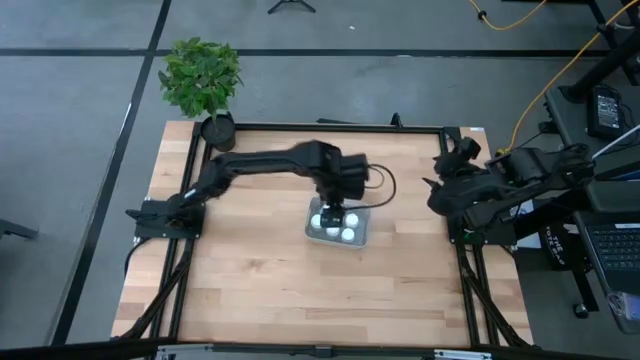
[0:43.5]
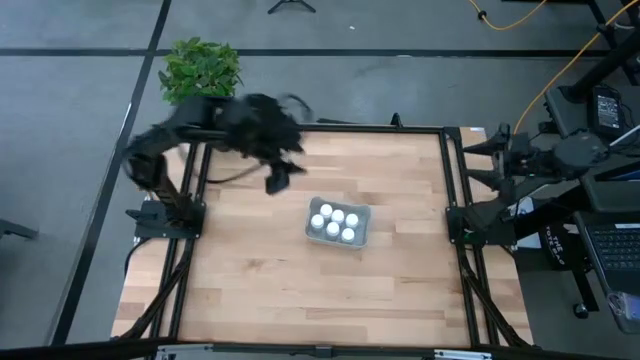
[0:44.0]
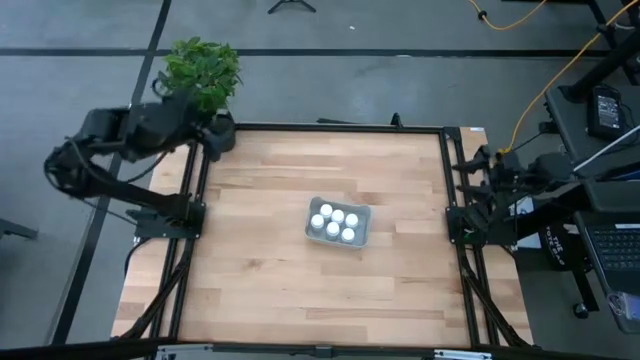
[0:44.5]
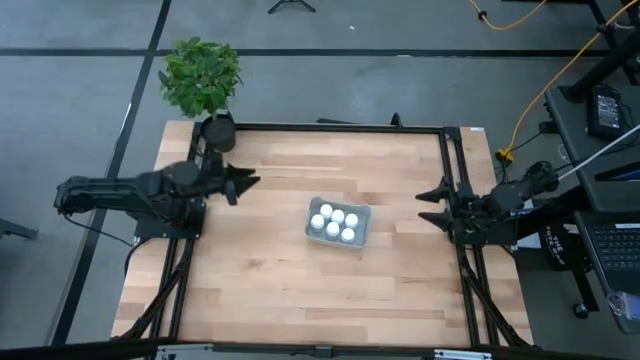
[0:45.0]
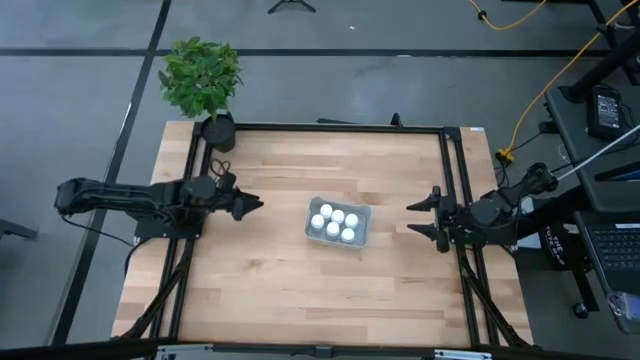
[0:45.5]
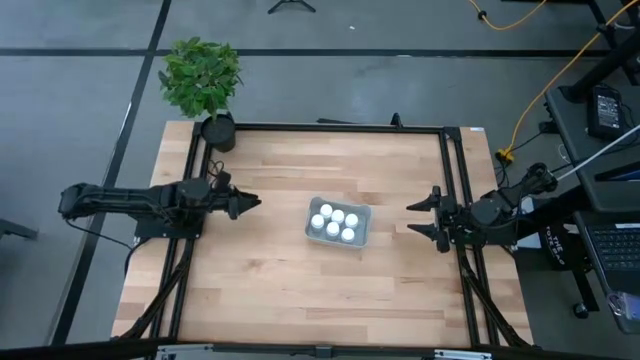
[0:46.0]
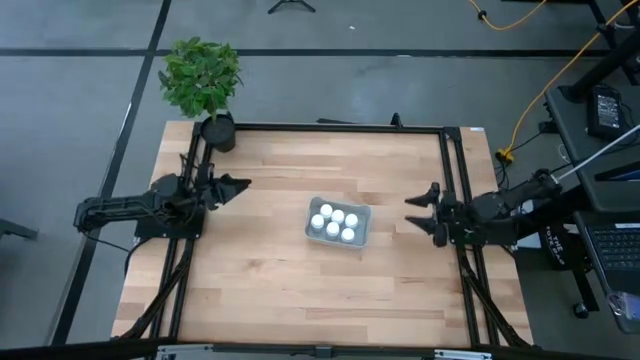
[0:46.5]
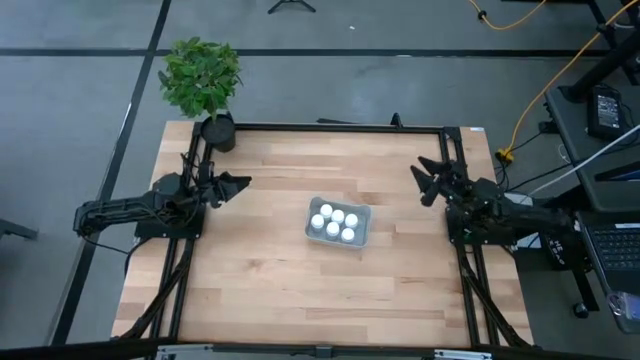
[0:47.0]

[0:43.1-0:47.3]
Task: Pick and place pill bottles into a basket
Return to Home Position

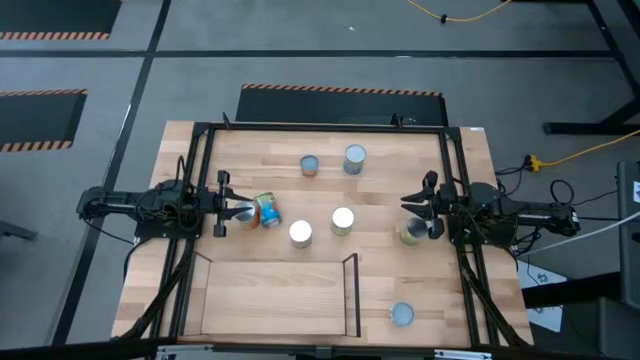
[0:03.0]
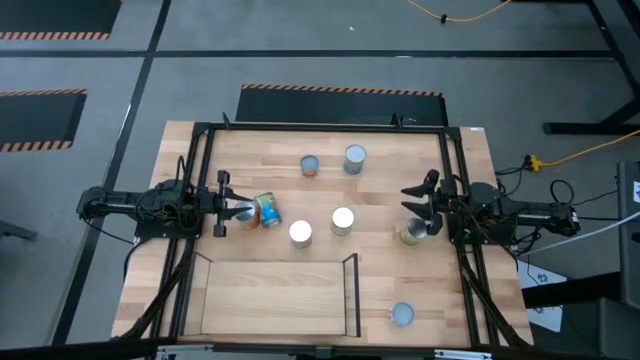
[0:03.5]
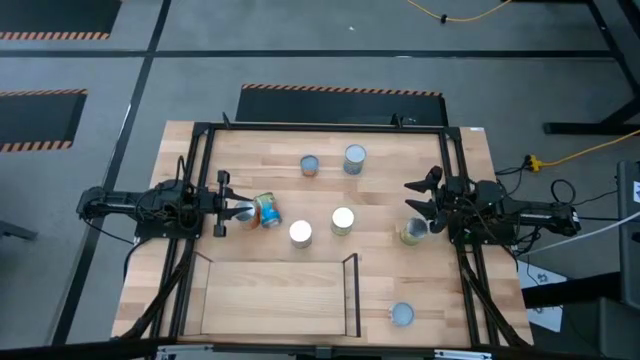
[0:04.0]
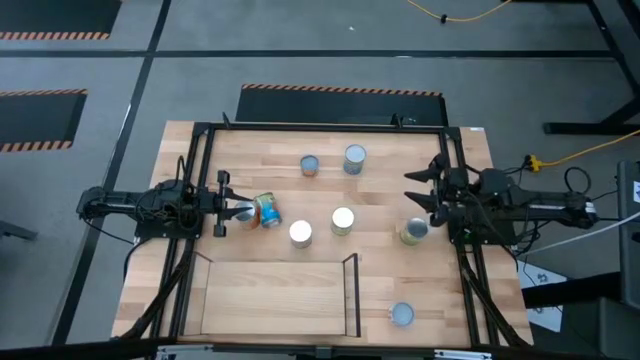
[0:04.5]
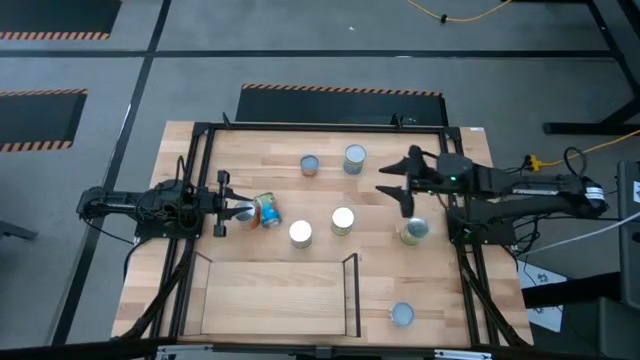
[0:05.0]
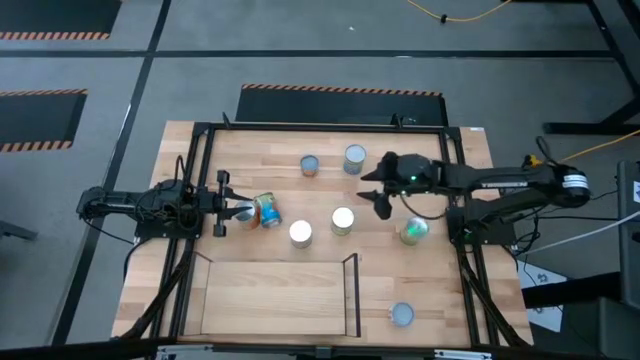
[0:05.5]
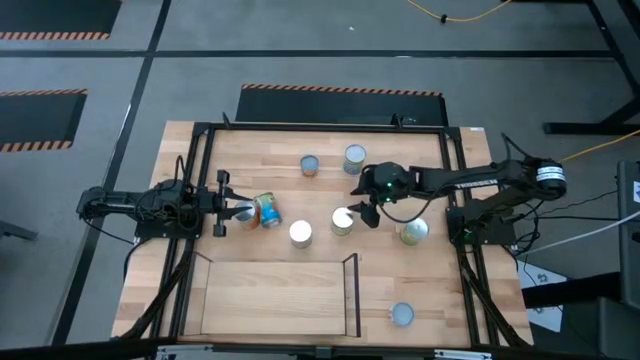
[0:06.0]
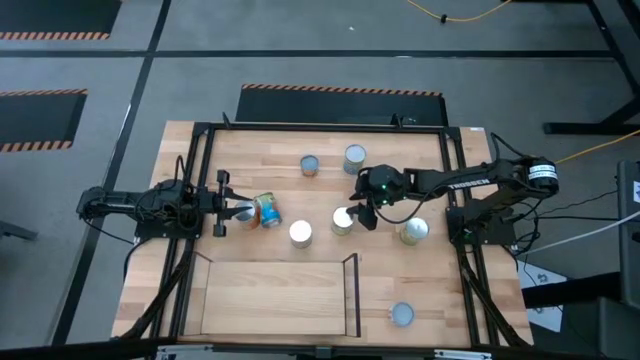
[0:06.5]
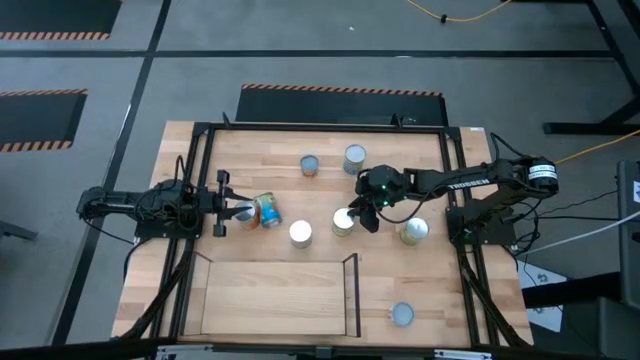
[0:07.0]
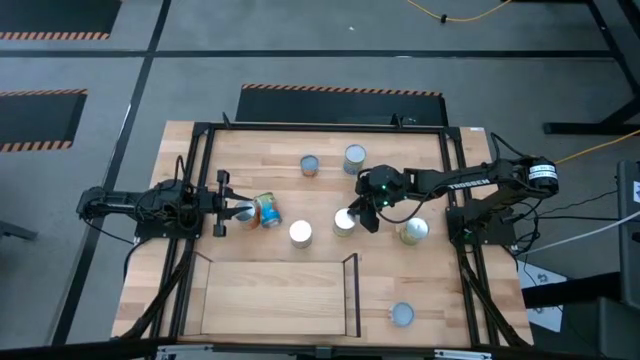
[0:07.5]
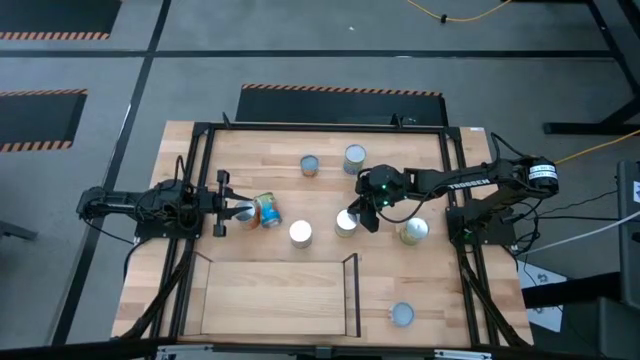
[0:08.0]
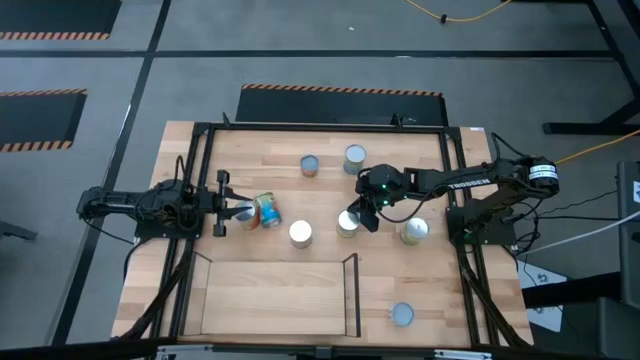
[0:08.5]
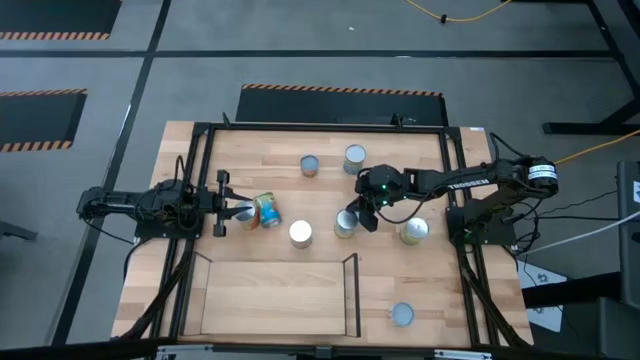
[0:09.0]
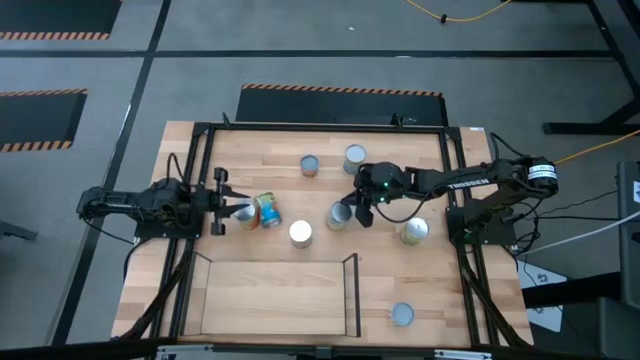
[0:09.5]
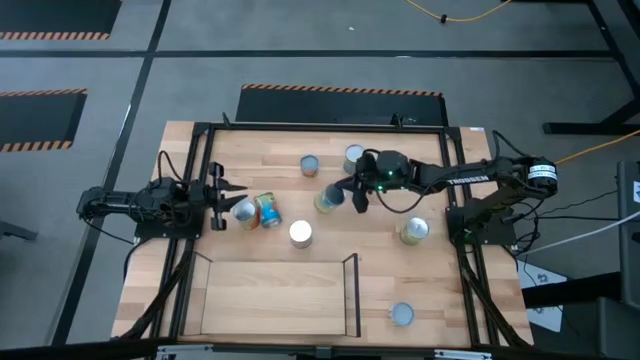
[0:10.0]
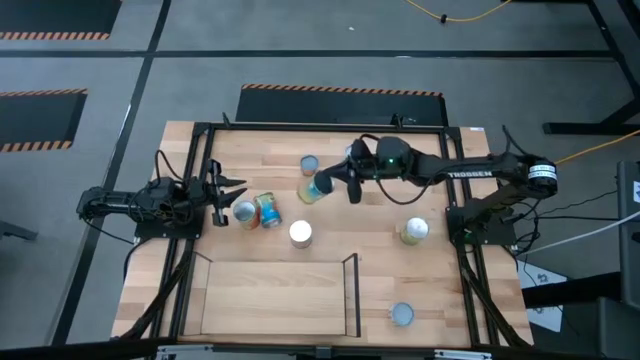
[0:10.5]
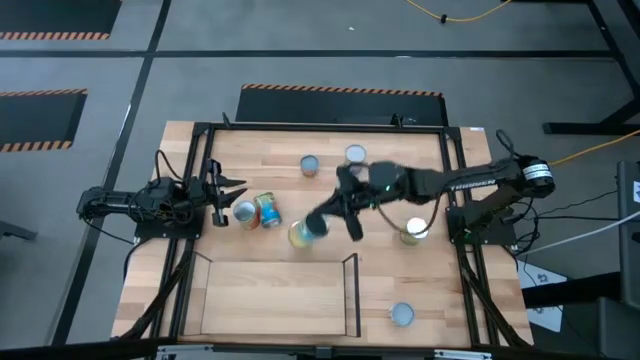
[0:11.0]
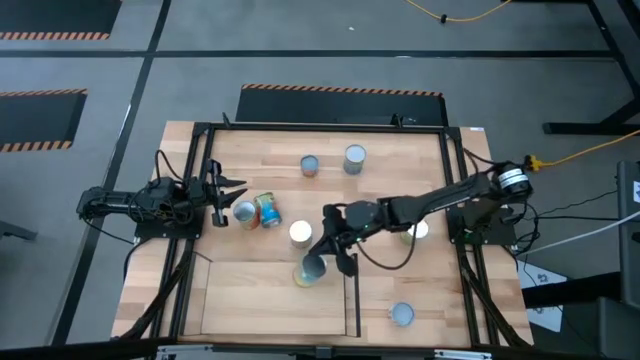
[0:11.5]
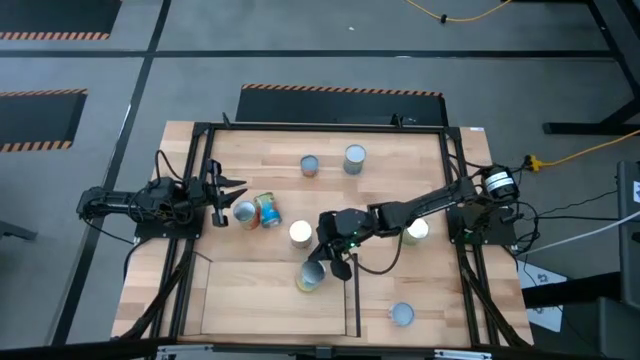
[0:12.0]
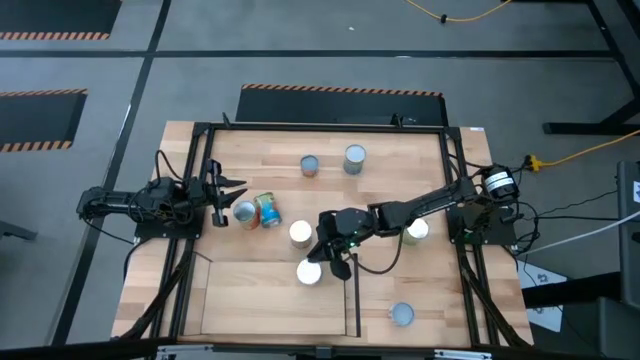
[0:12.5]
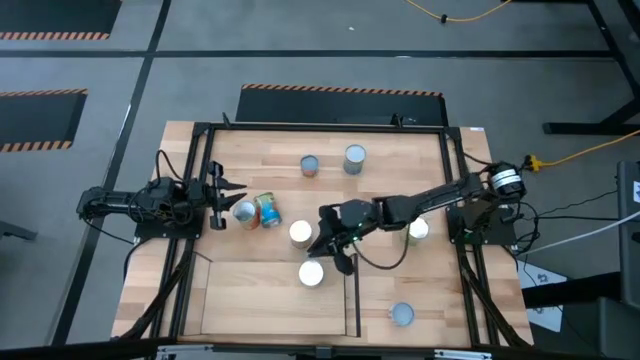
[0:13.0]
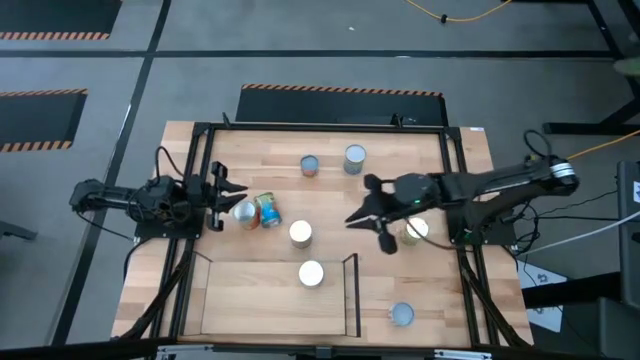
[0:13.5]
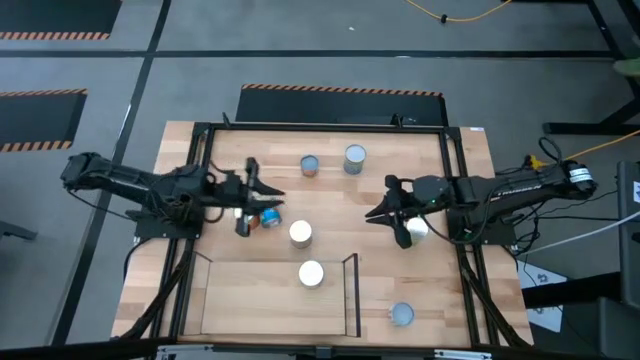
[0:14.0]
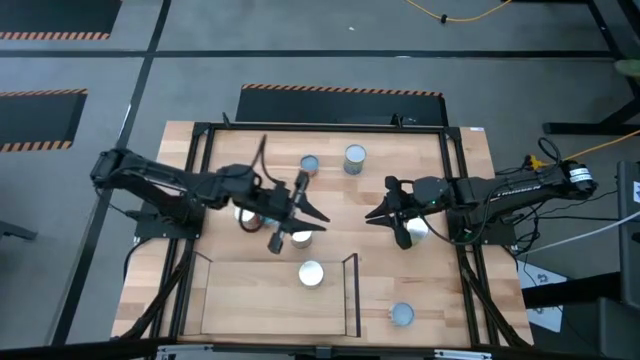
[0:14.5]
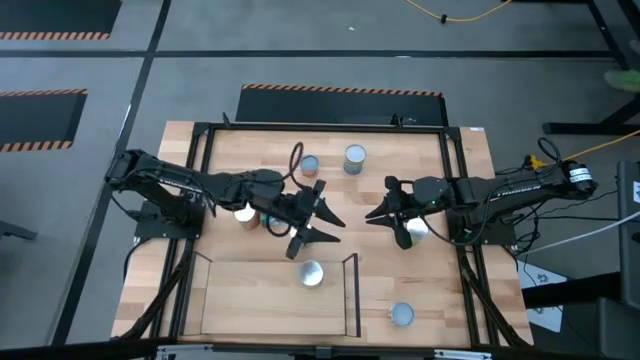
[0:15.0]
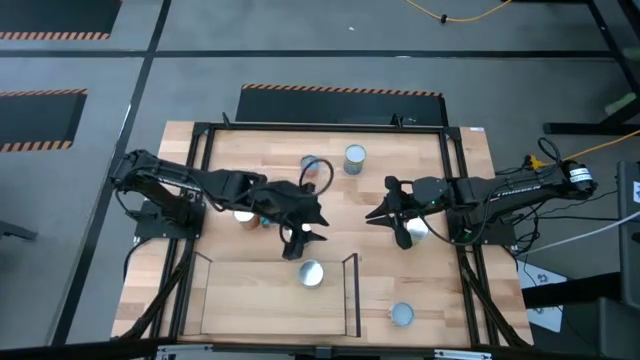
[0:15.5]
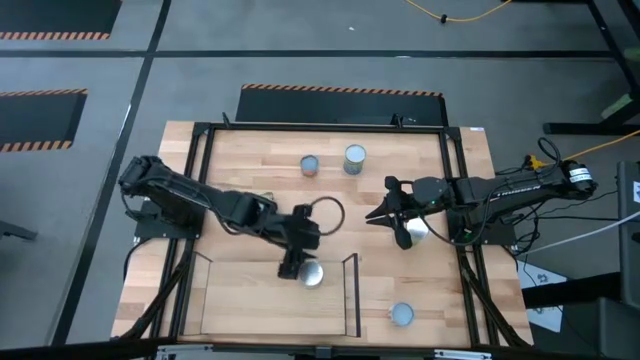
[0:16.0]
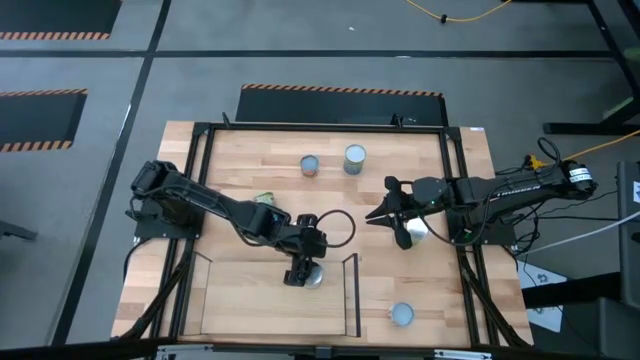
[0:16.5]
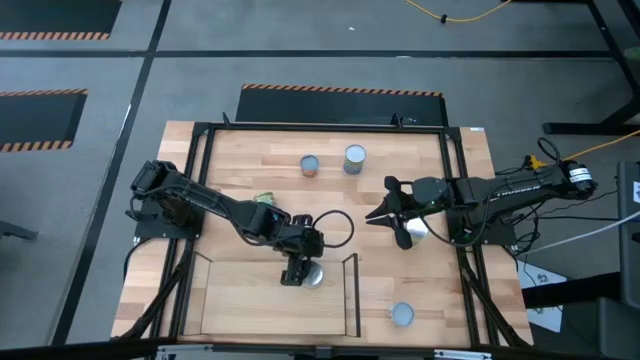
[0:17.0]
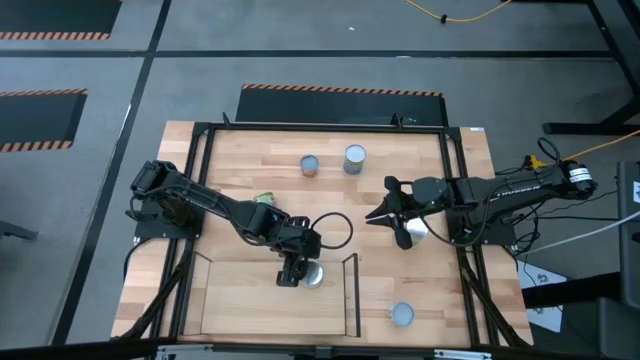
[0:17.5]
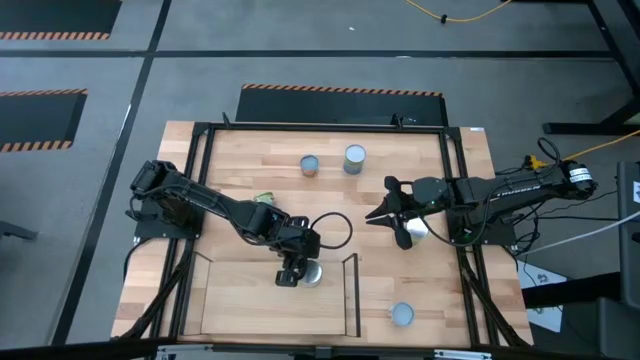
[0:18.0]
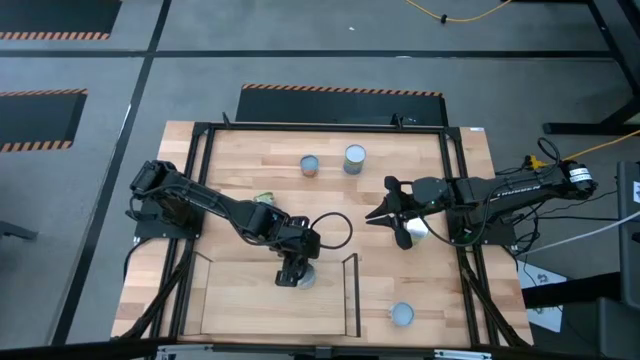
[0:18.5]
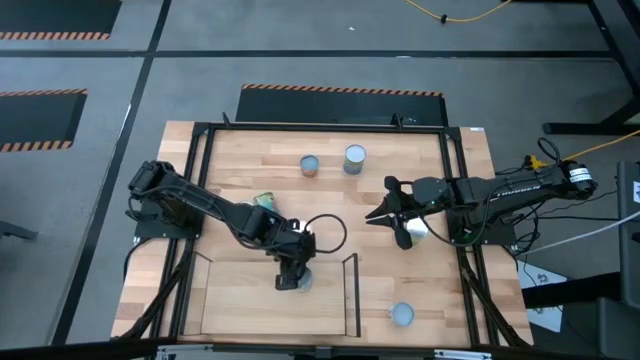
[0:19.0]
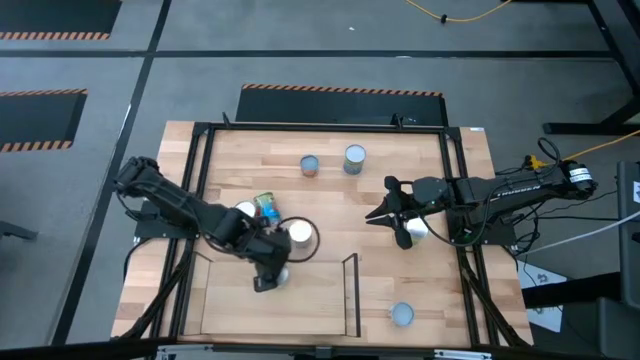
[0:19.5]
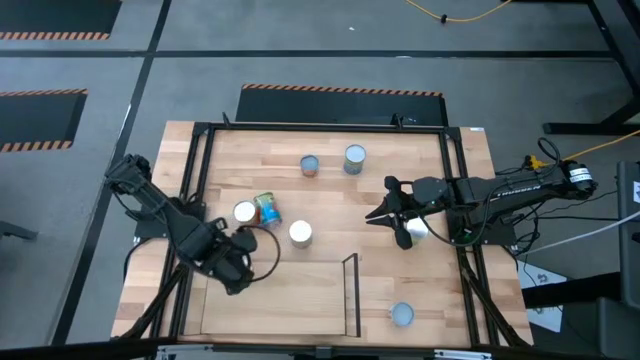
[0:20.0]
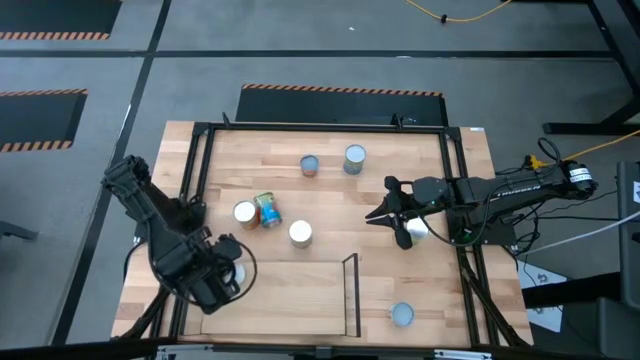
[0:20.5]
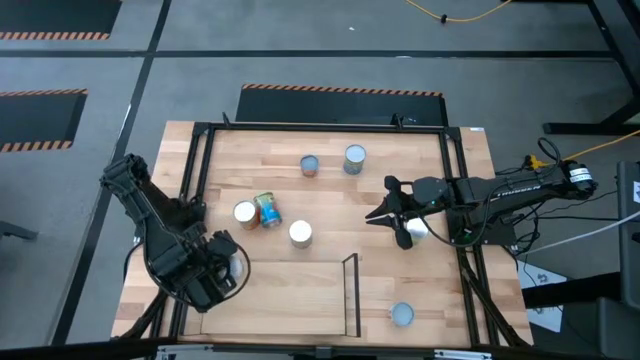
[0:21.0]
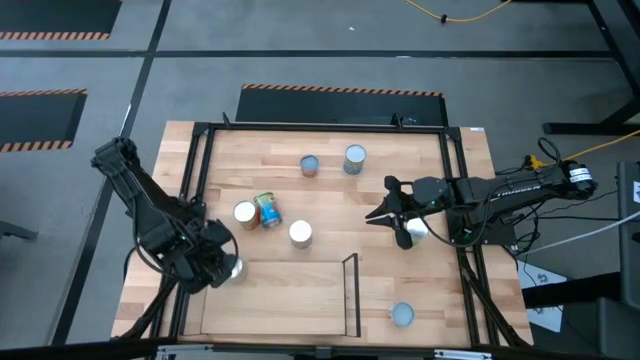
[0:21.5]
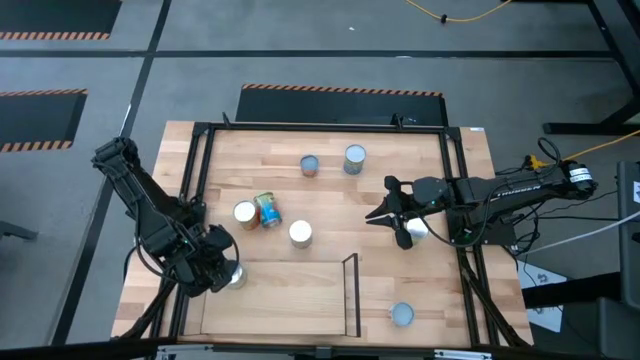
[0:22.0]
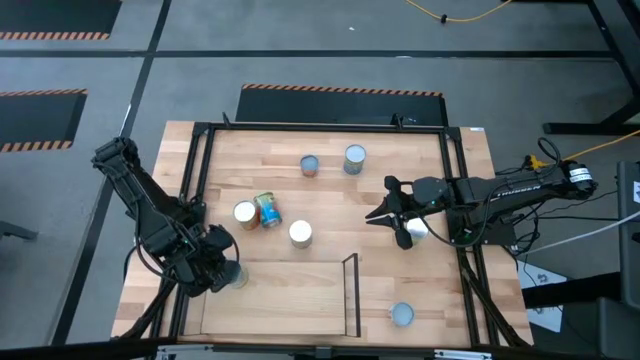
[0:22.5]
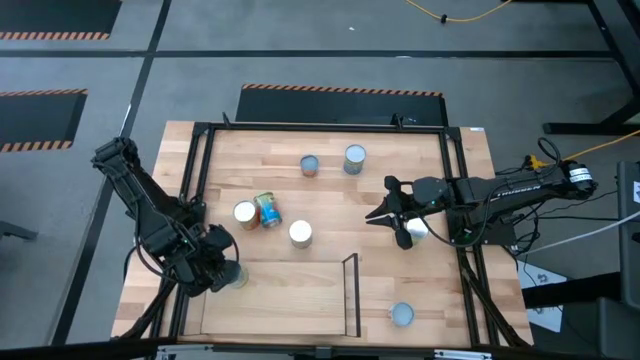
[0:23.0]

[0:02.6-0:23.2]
Task: Pick and place cans onto a shelf
Put the canned carrot on the shelf
